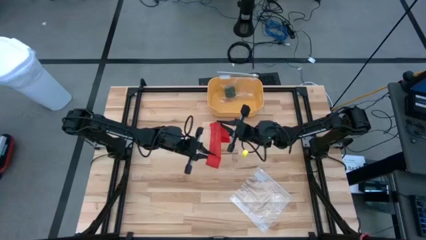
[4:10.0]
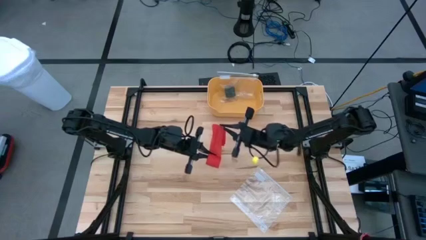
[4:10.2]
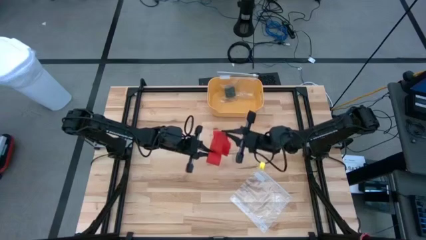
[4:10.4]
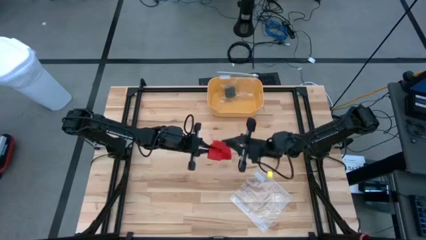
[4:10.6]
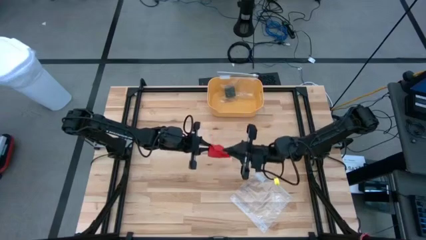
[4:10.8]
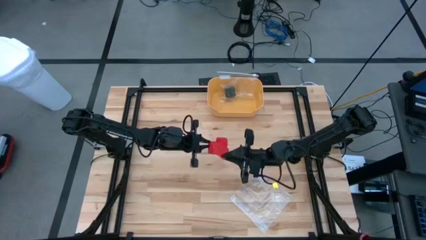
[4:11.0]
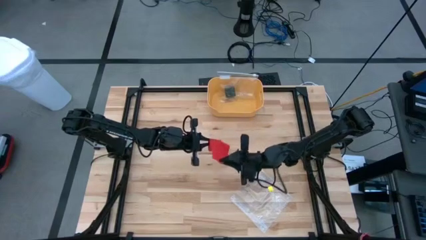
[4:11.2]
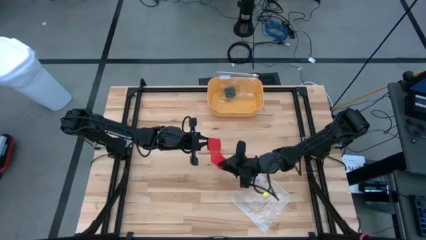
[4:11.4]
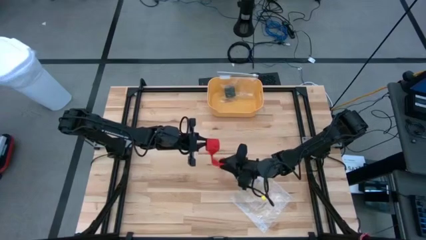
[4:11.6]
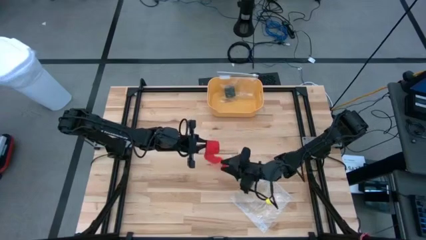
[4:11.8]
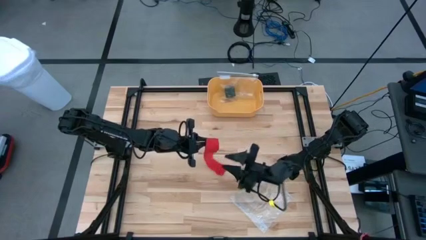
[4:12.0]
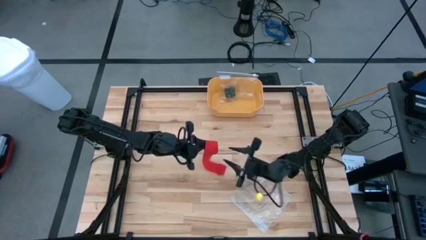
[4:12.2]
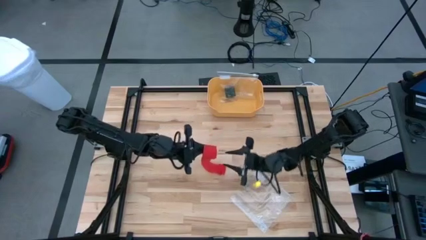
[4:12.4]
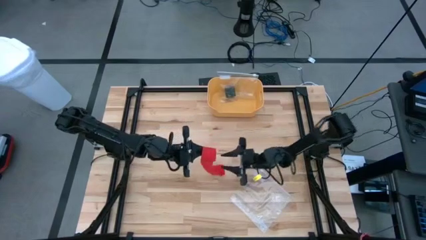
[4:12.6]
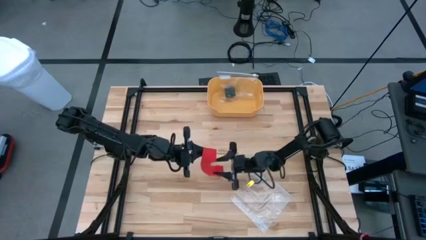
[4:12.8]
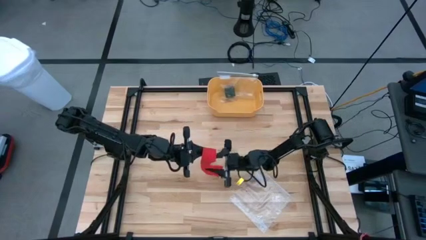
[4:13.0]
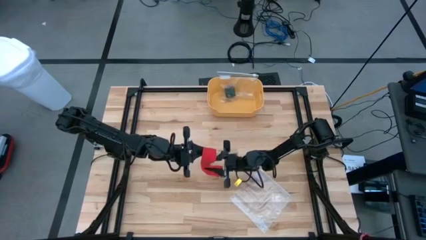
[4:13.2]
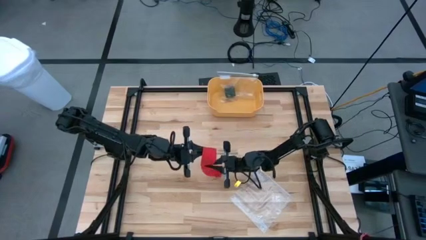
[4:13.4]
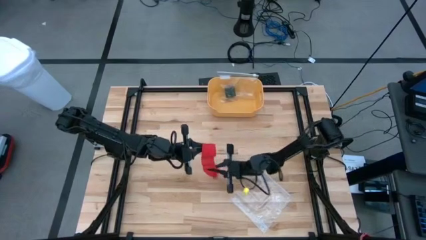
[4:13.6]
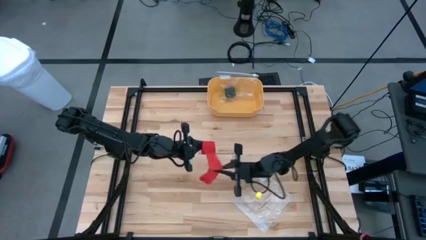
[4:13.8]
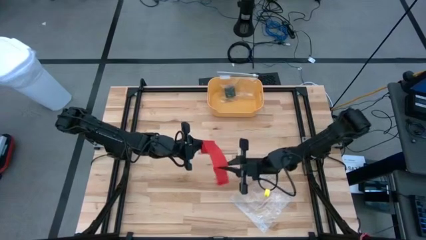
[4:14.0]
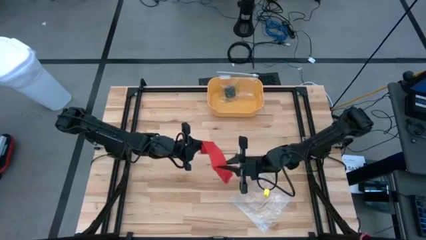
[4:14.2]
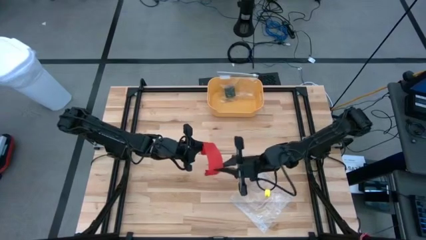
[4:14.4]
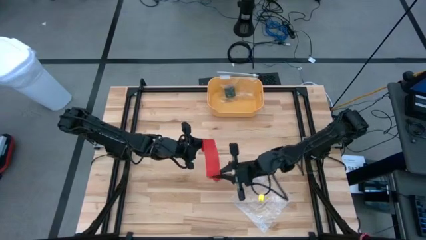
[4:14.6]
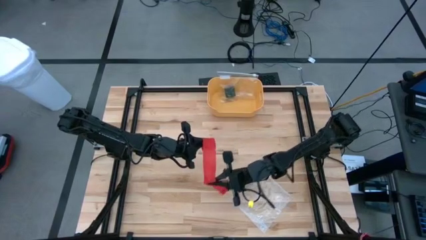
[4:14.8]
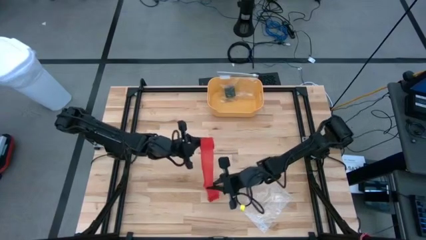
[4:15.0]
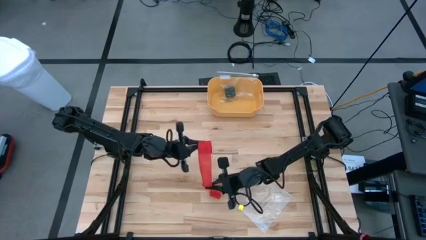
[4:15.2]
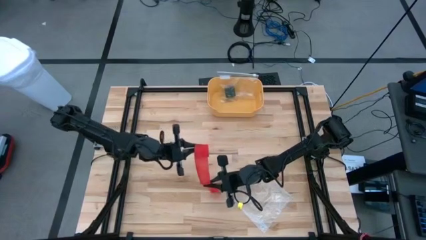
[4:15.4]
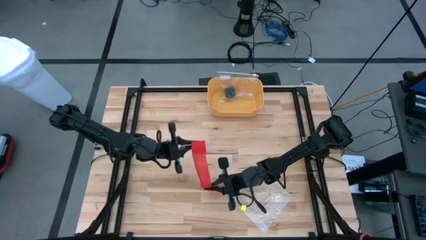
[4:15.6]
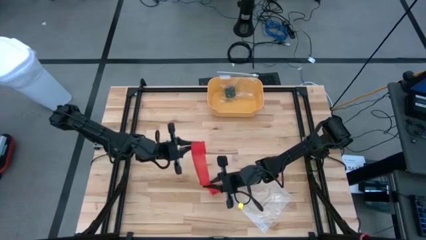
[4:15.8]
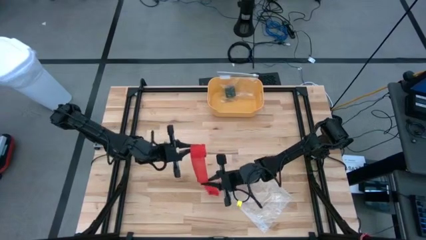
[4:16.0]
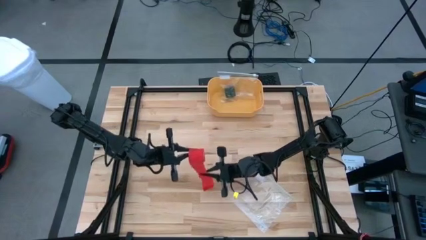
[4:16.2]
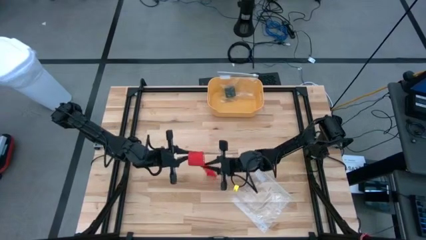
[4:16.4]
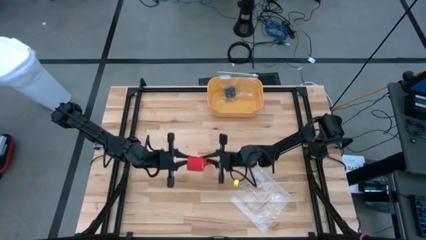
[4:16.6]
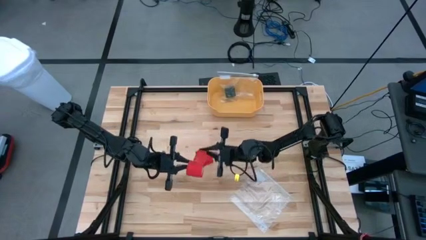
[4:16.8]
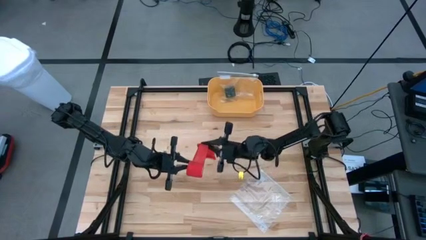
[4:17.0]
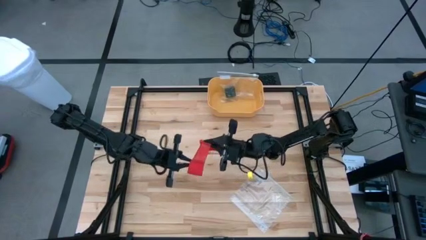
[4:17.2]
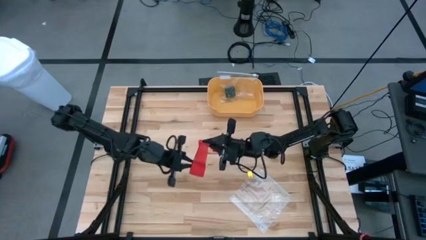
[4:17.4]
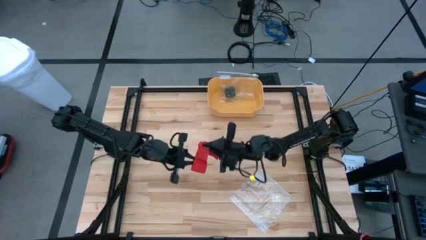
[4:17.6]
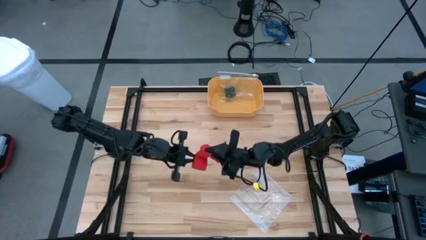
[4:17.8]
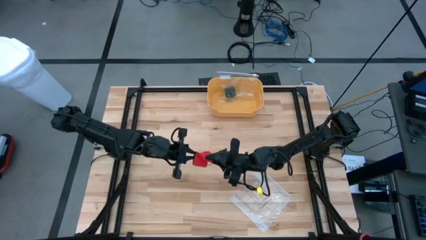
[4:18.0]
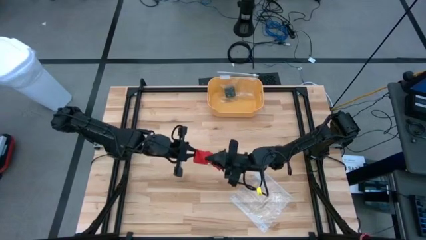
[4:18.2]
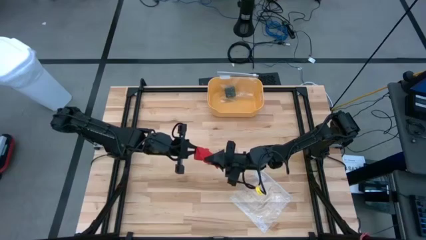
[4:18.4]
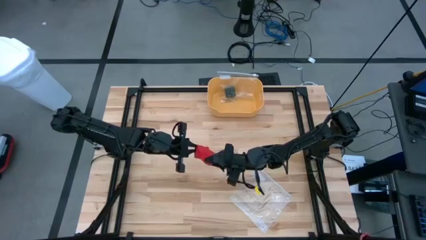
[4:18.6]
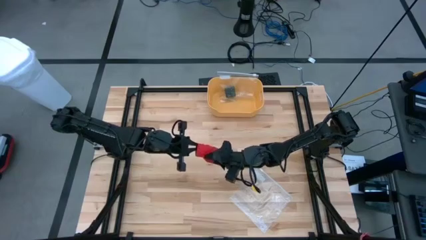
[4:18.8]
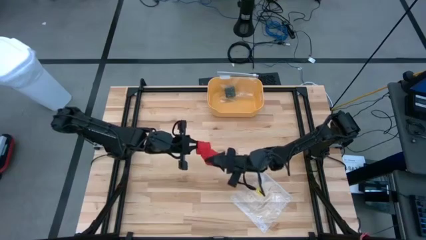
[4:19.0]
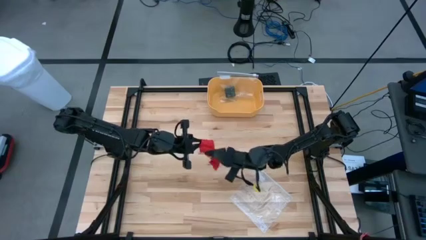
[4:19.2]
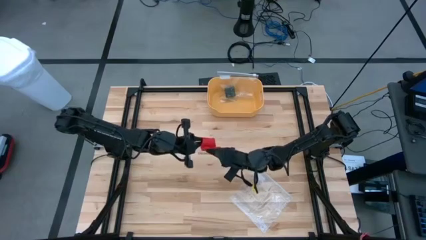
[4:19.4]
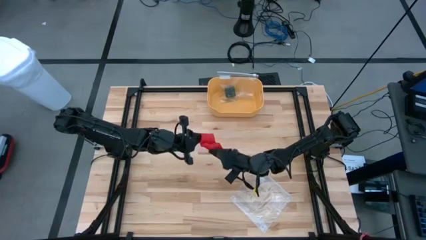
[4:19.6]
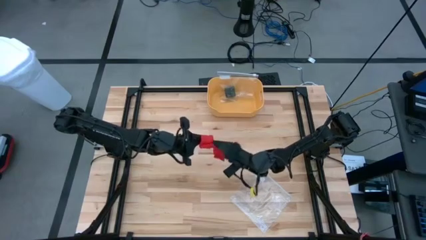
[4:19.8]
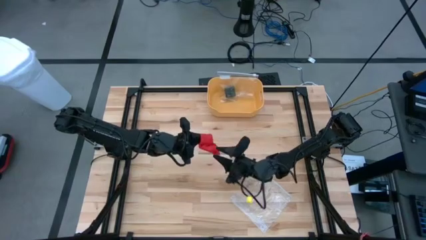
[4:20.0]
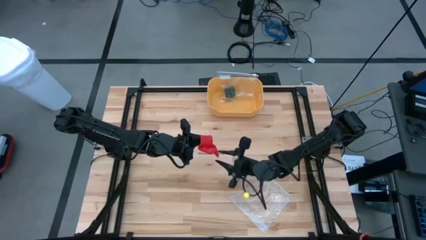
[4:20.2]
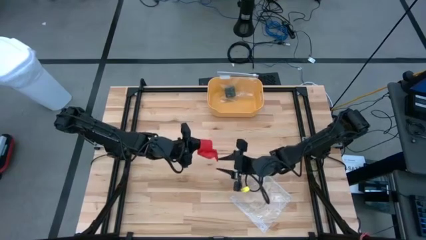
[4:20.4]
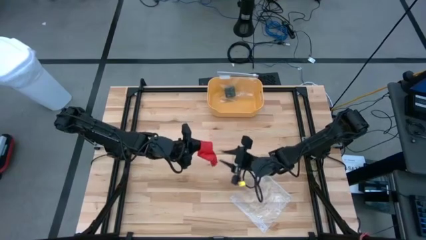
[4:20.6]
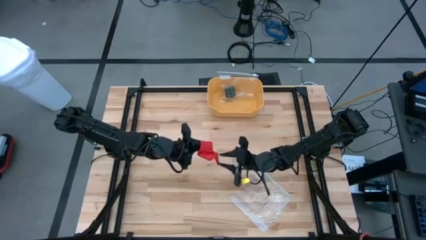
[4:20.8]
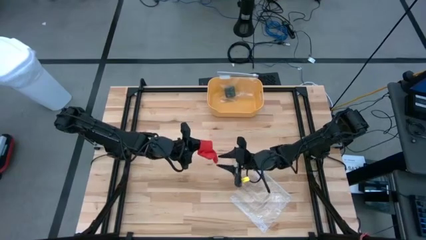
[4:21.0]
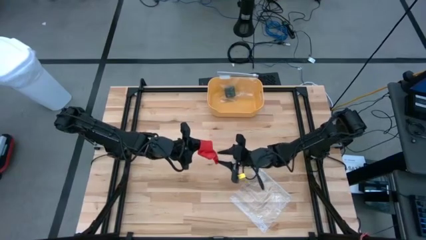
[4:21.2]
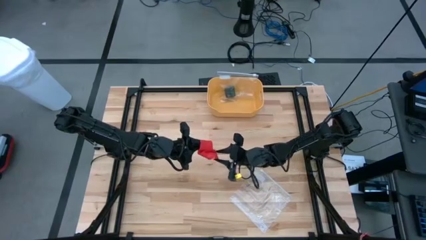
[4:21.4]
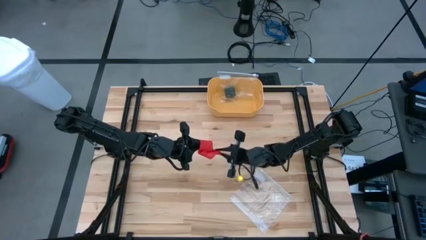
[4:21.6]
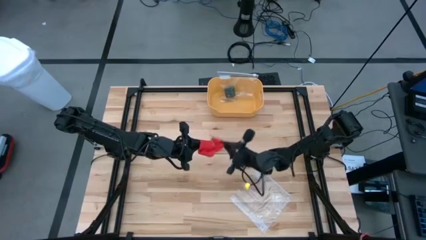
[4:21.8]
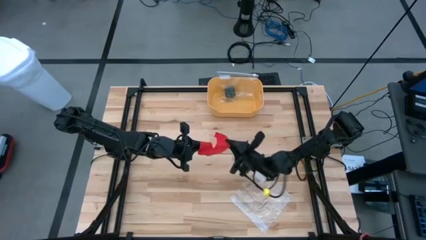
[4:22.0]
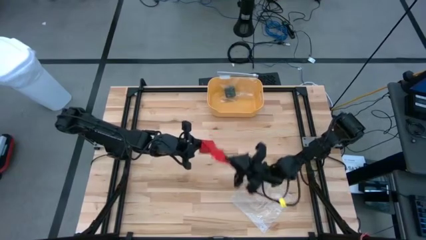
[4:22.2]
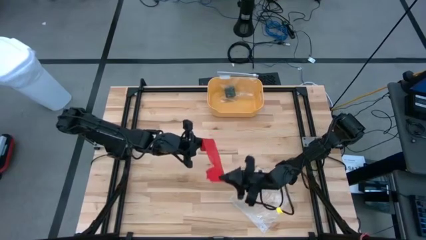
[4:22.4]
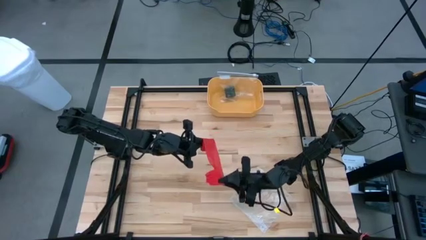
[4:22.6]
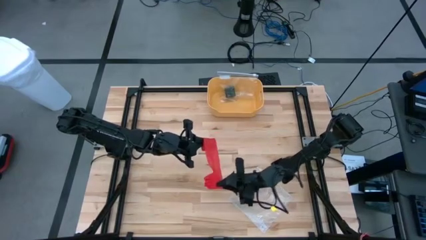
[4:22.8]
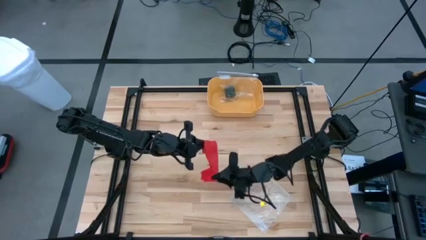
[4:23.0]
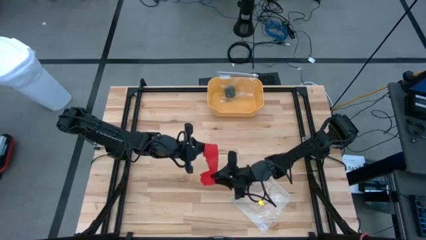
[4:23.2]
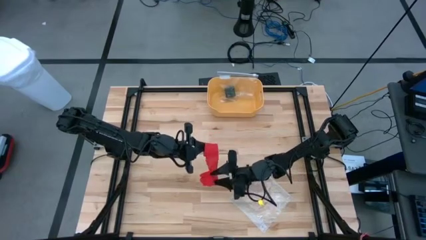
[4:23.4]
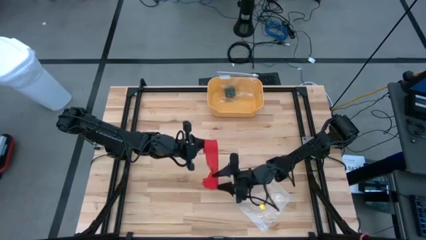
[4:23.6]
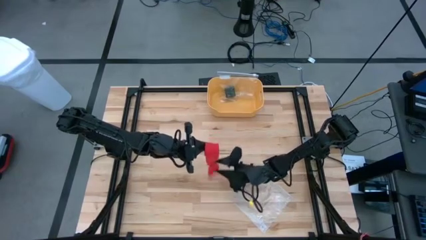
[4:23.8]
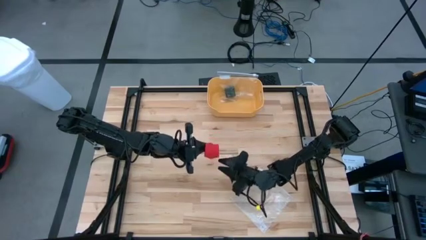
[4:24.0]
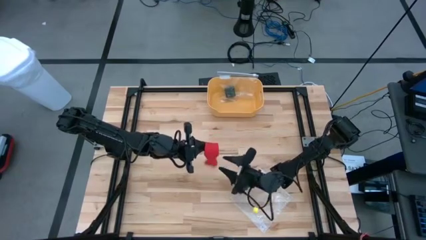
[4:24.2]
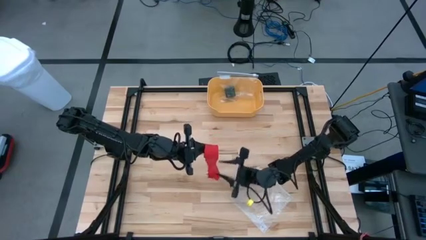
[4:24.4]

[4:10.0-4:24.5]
Task: Roll bandage
Roll the red bandage
